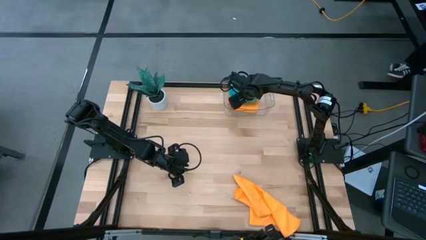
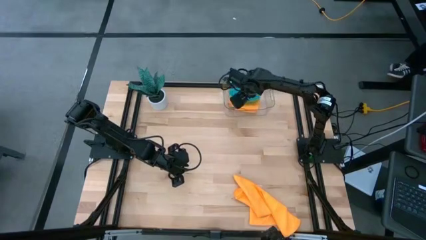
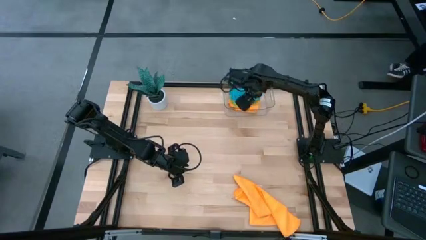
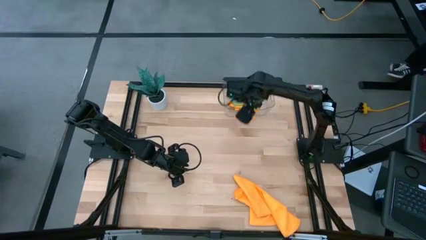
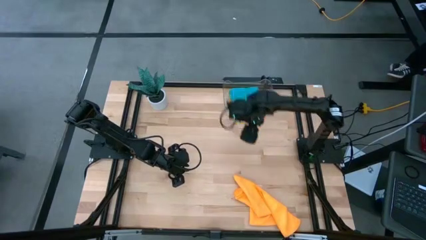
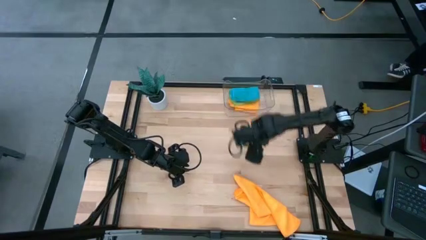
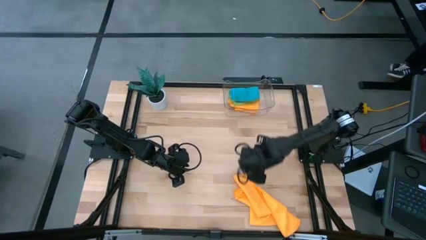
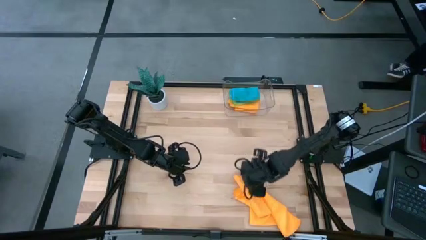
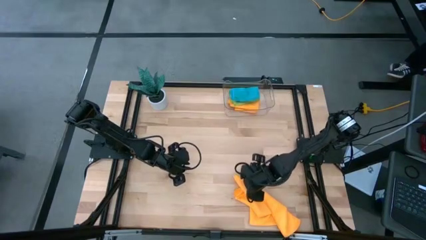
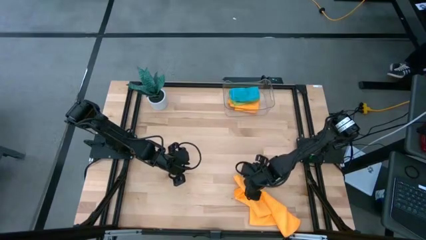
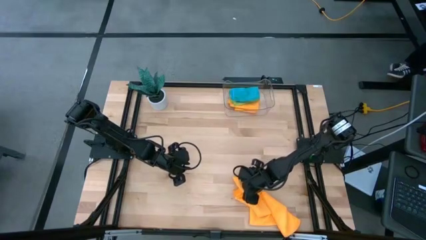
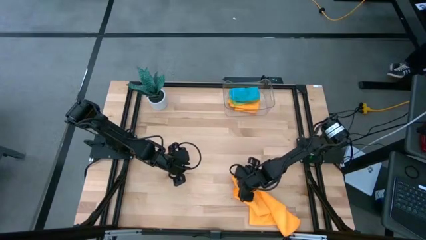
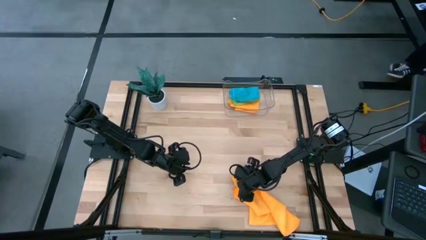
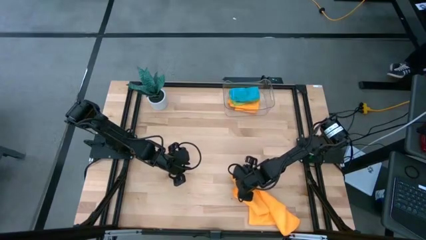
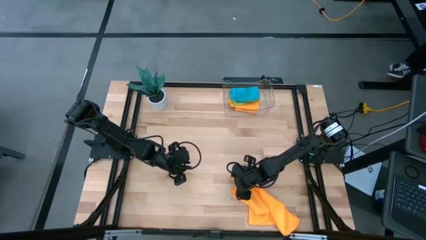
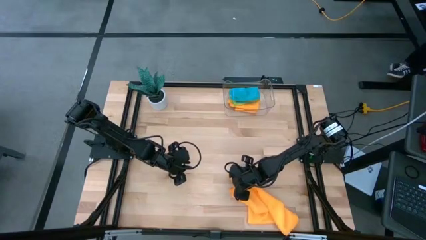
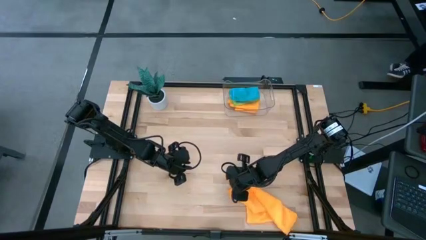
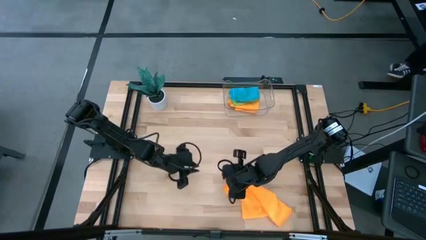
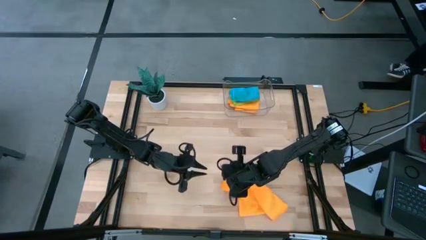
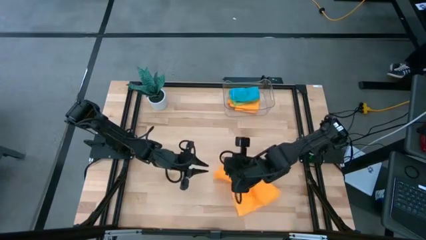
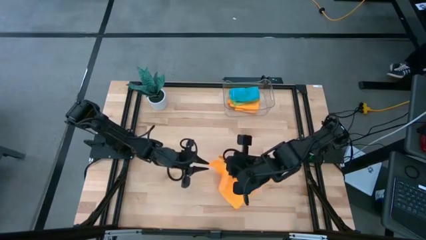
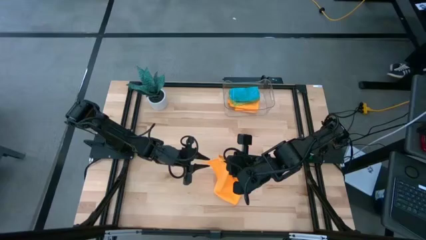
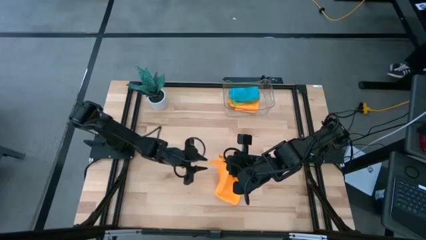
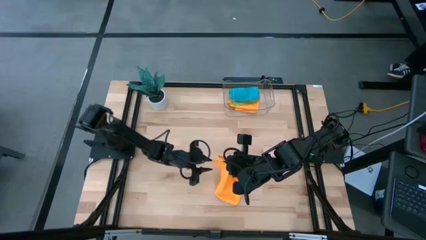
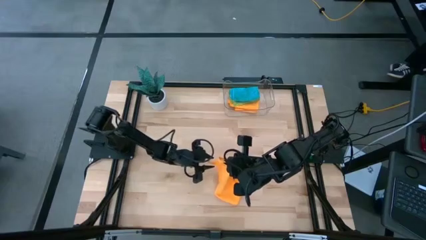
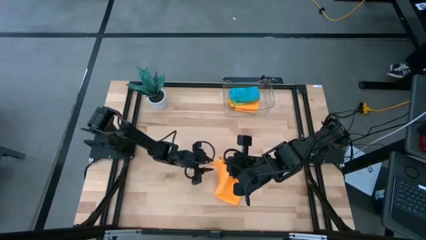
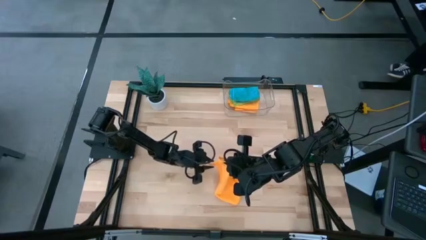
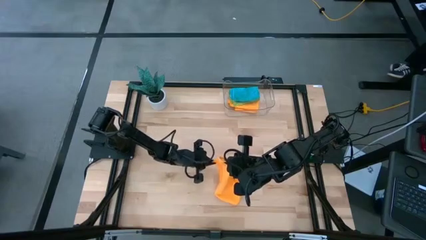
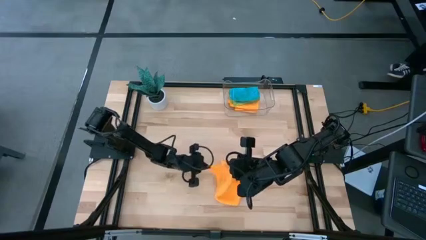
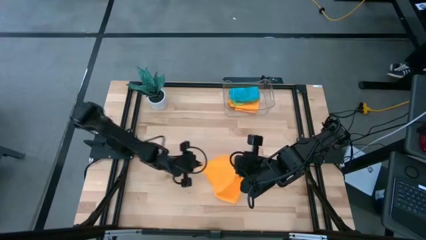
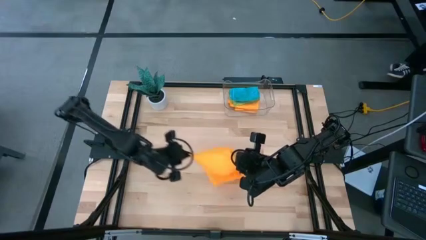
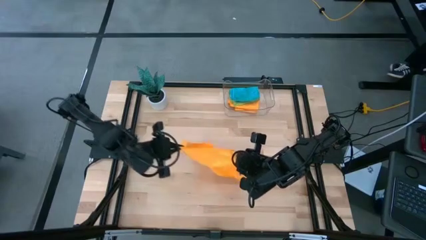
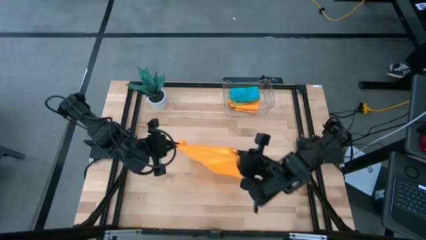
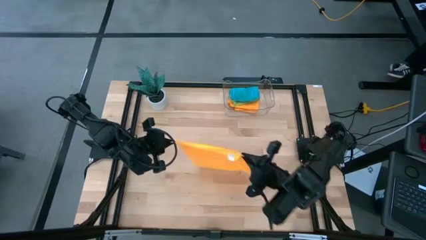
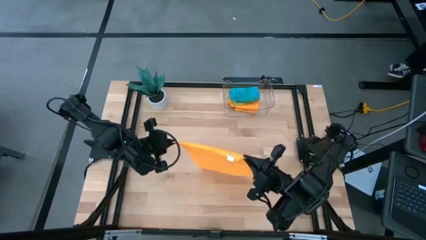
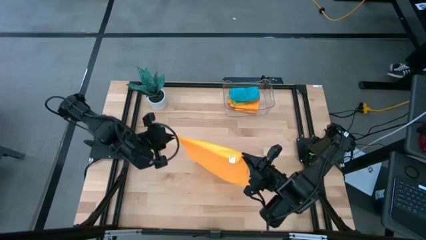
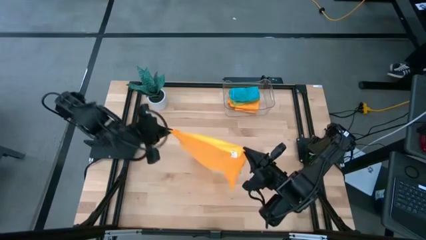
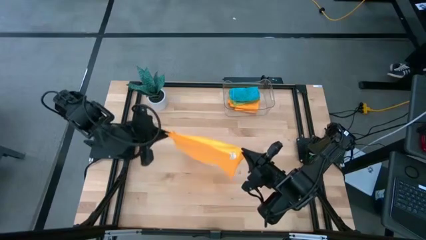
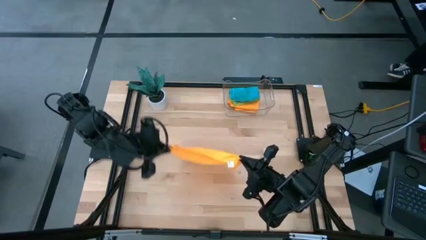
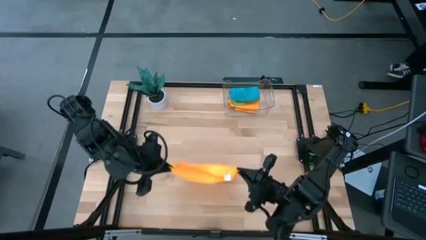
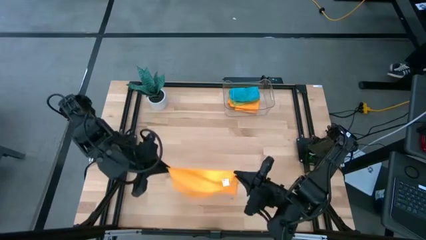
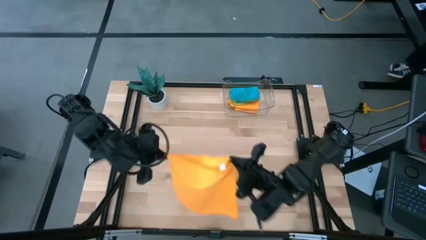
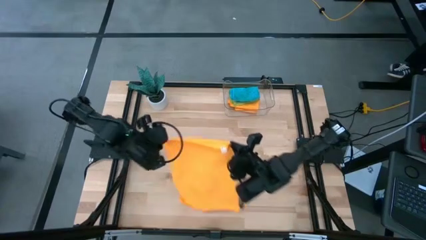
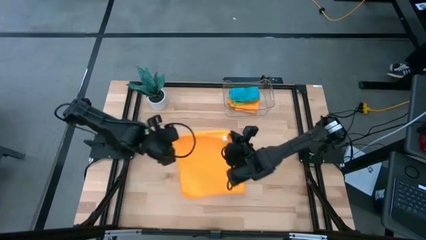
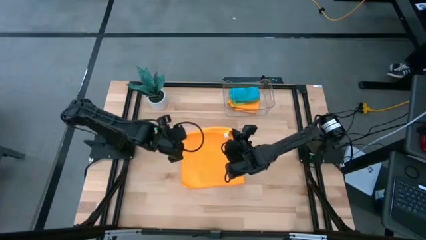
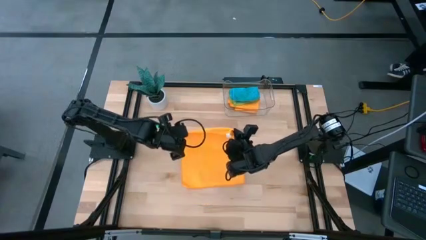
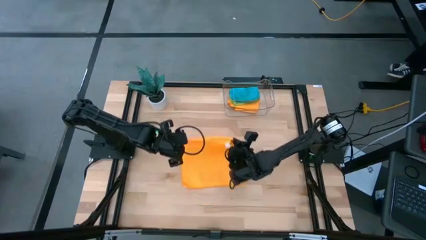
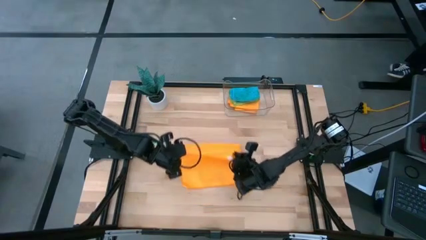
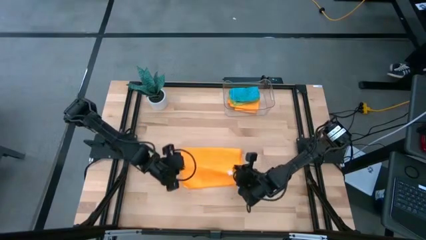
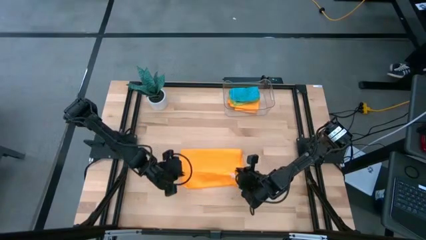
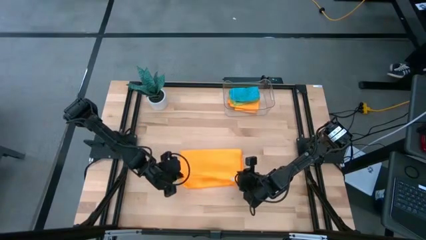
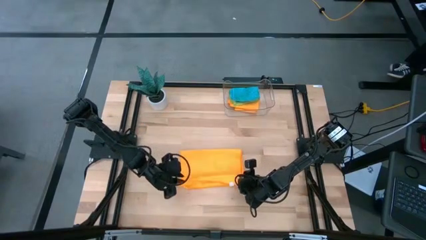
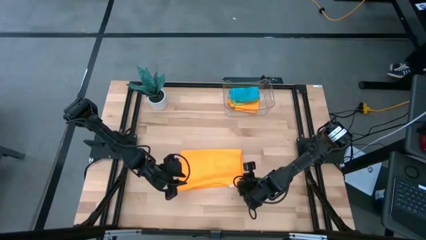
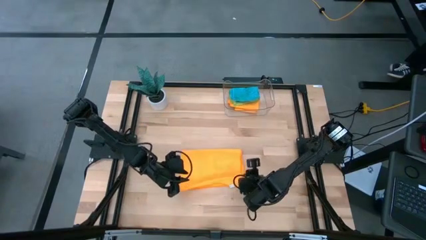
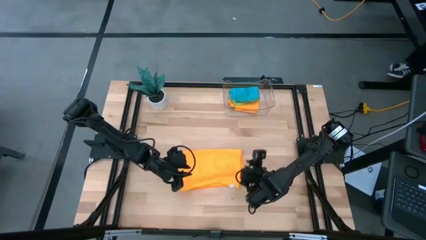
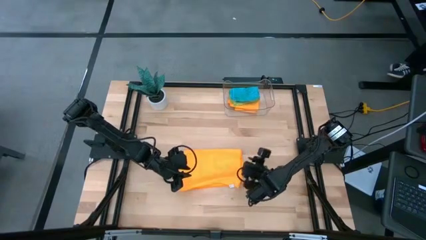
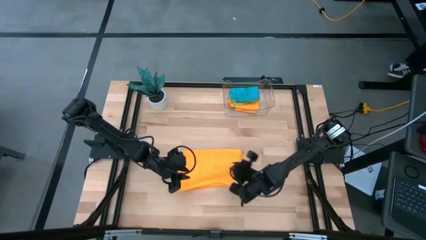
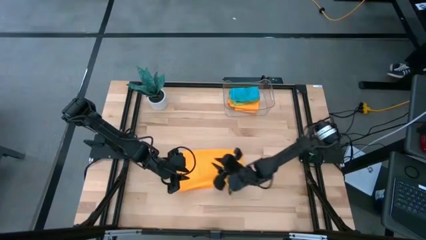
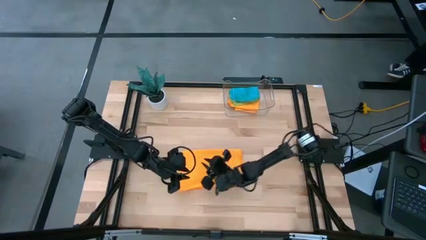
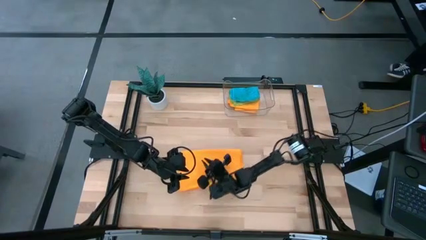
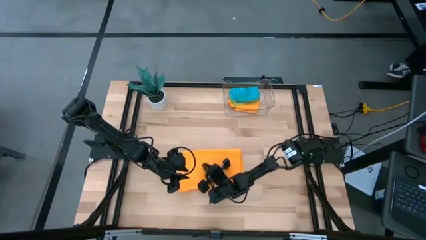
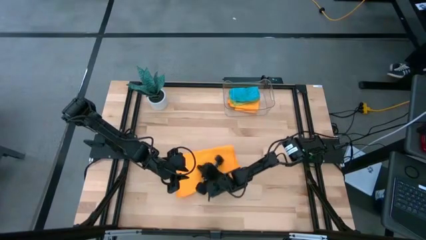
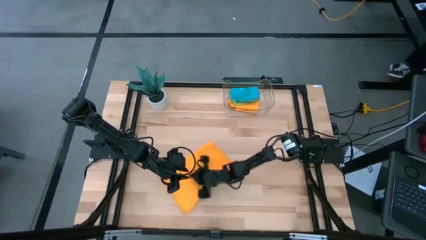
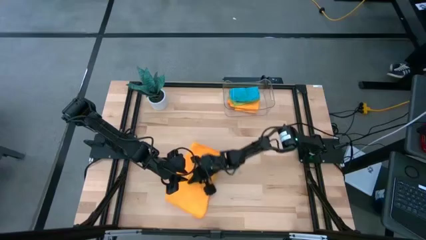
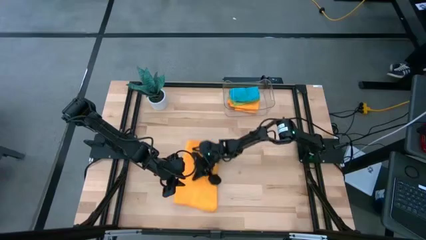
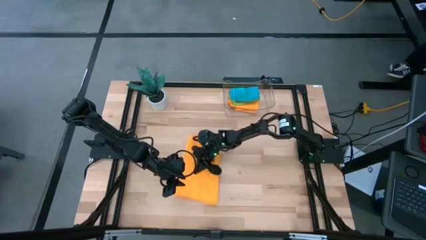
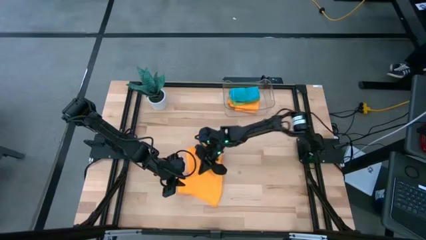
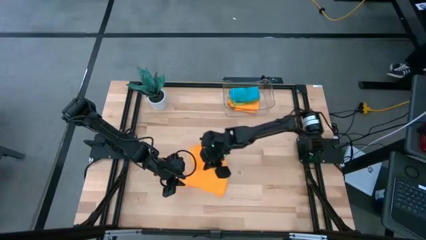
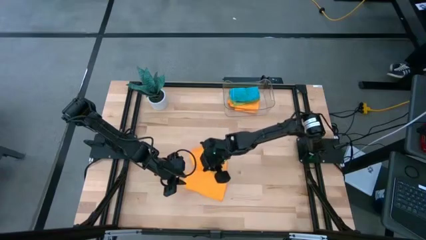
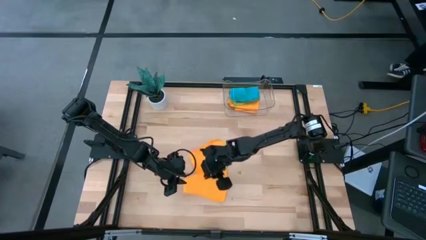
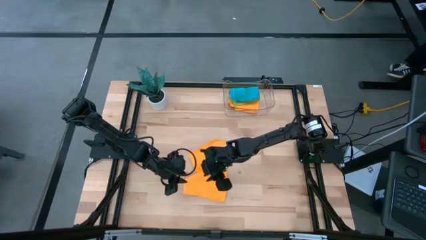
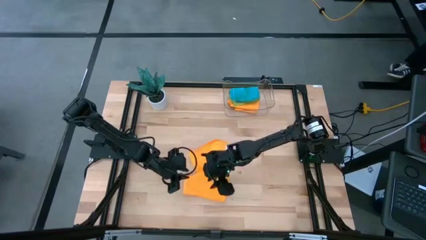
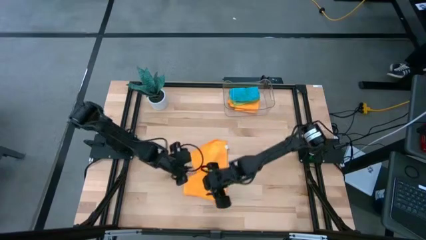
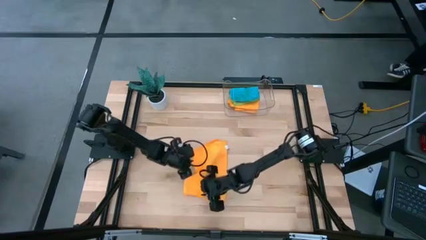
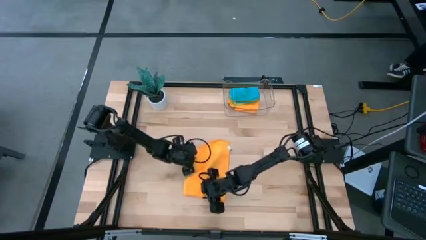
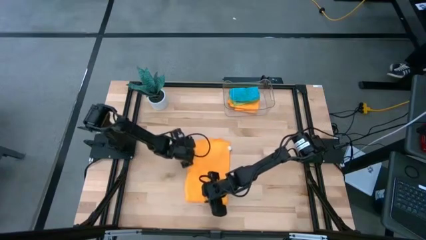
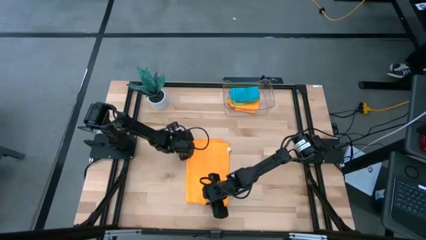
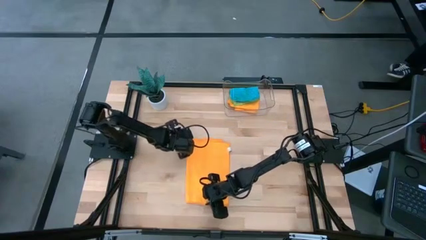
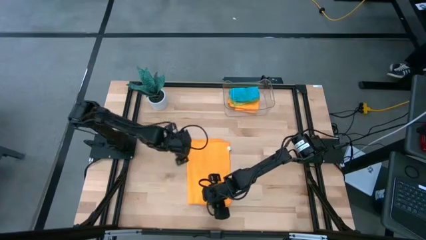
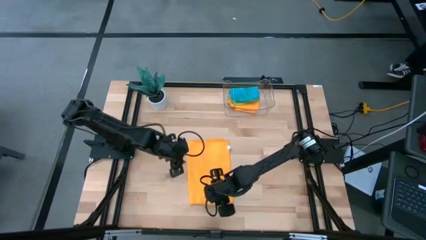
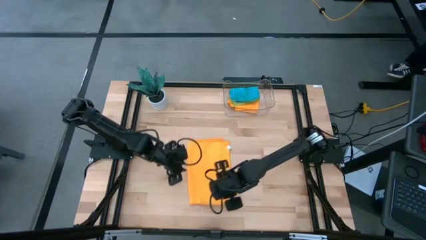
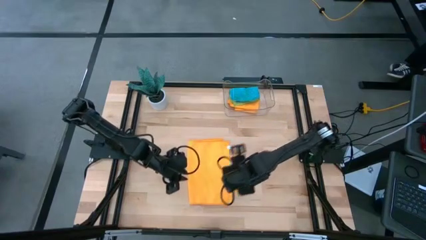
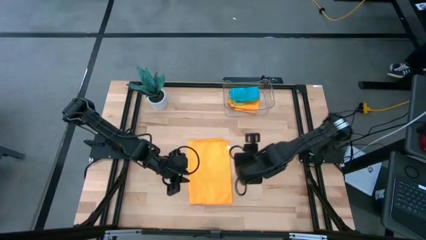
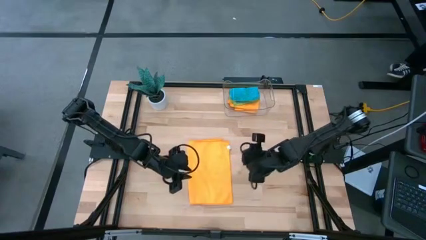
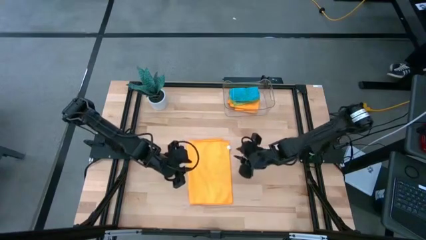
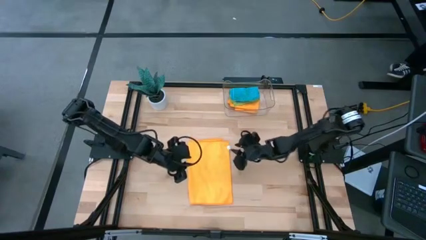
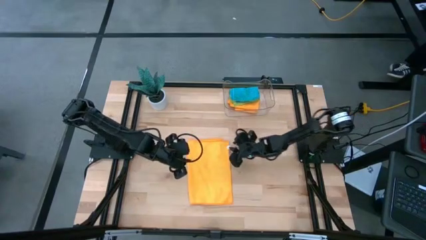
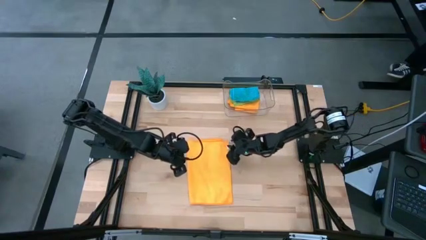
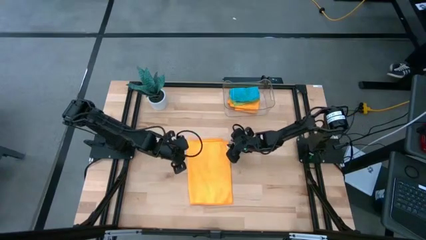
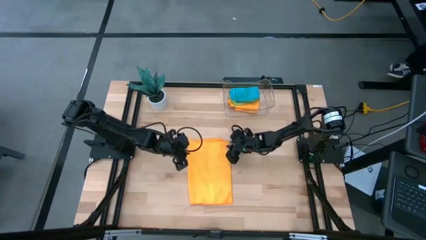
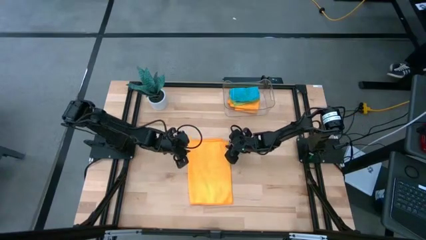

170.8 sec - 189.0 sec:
Task: Fold microfiber towels
Fold the orange microfiber towel
